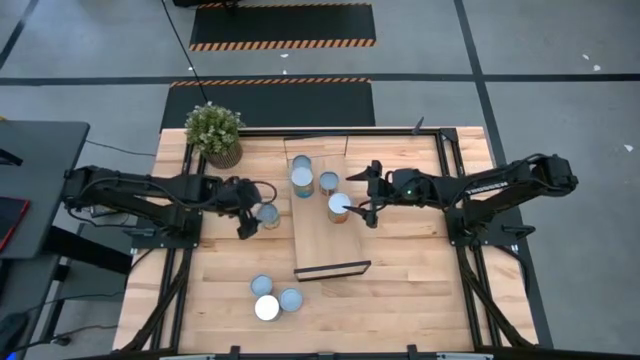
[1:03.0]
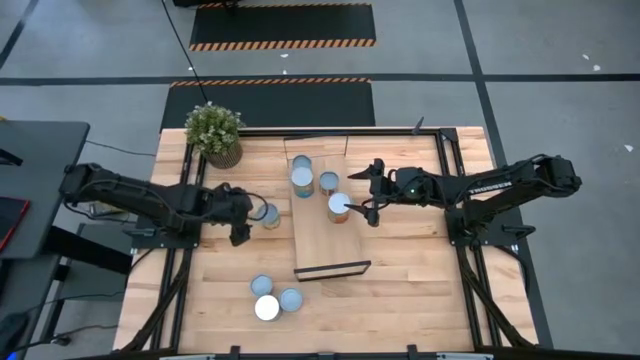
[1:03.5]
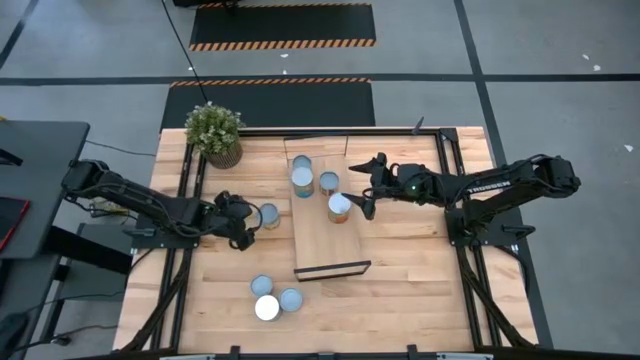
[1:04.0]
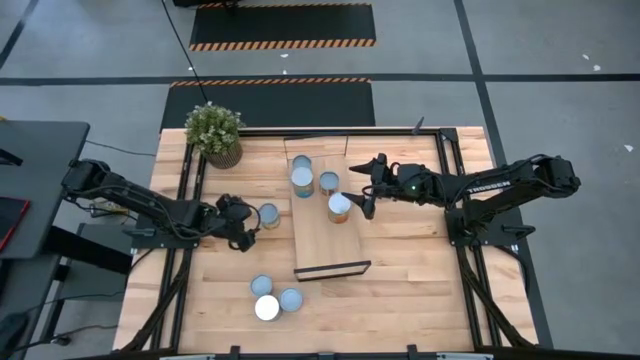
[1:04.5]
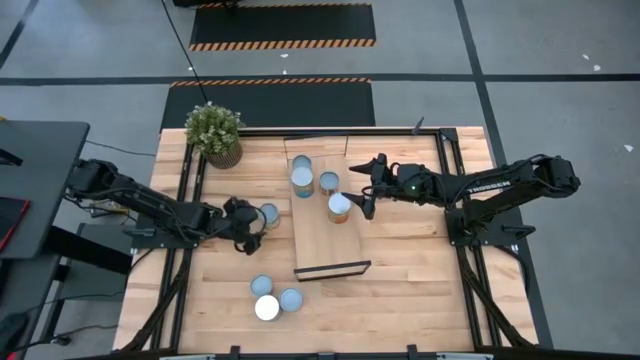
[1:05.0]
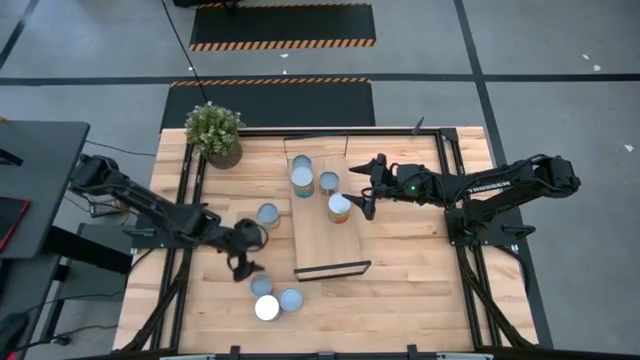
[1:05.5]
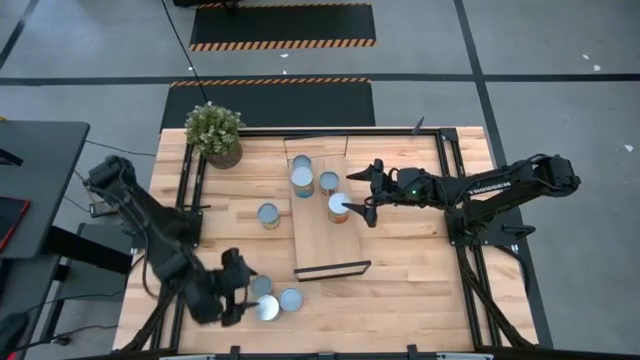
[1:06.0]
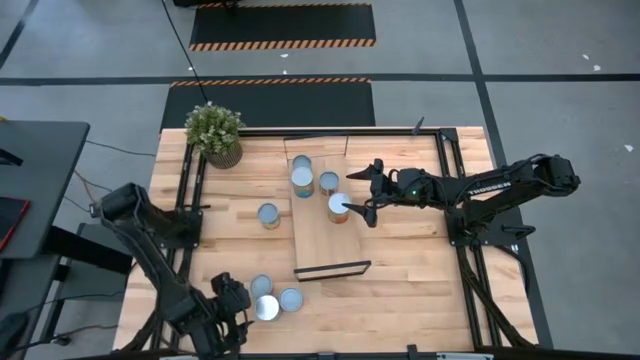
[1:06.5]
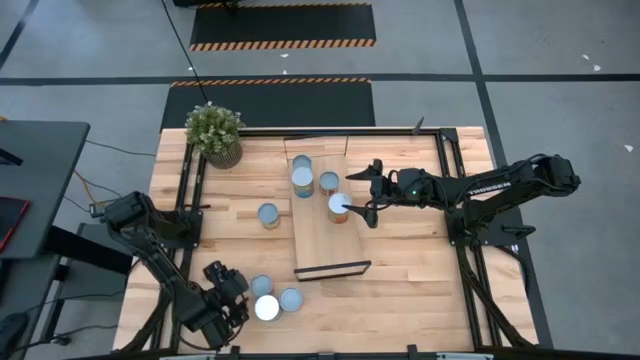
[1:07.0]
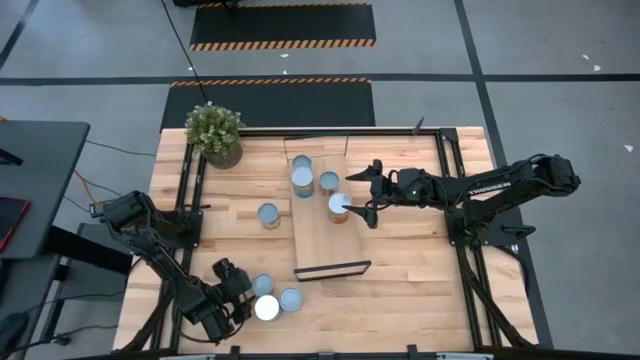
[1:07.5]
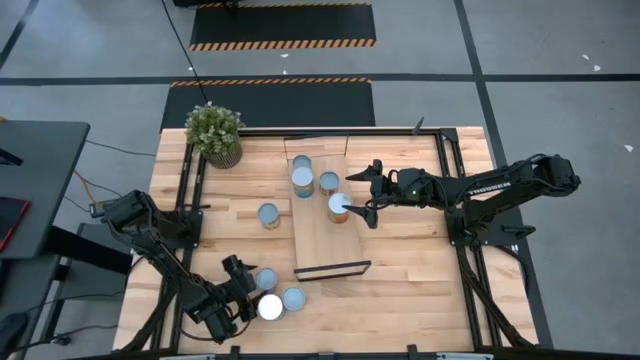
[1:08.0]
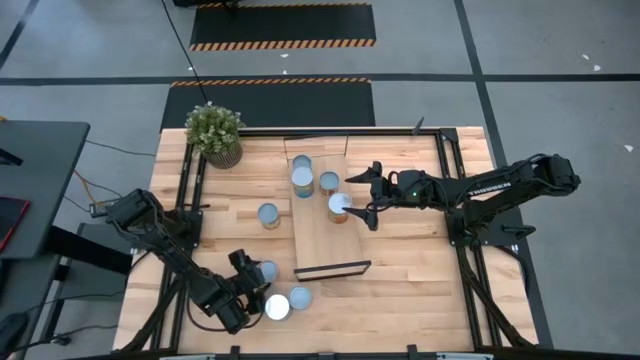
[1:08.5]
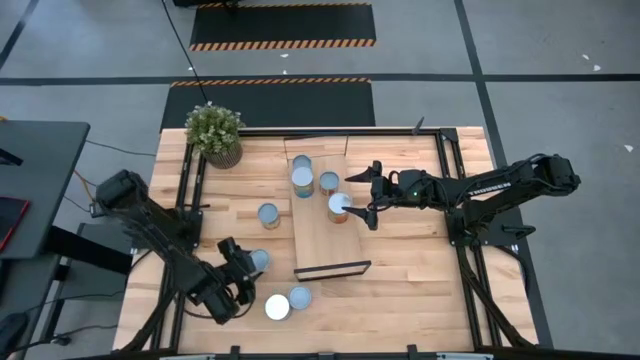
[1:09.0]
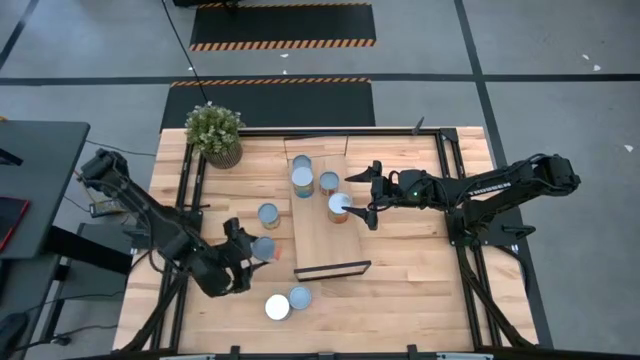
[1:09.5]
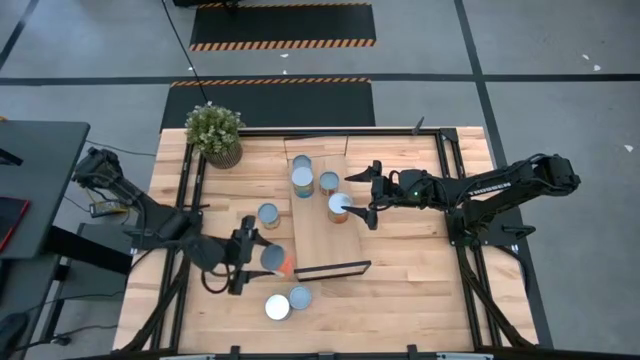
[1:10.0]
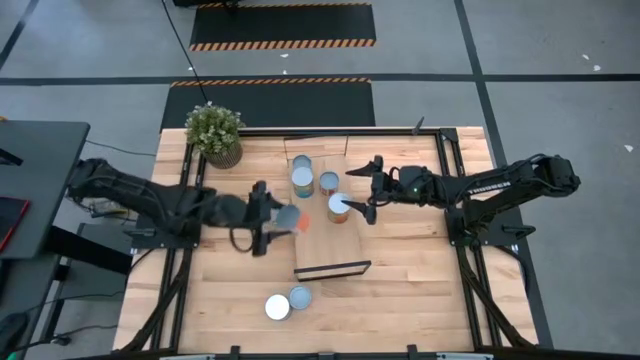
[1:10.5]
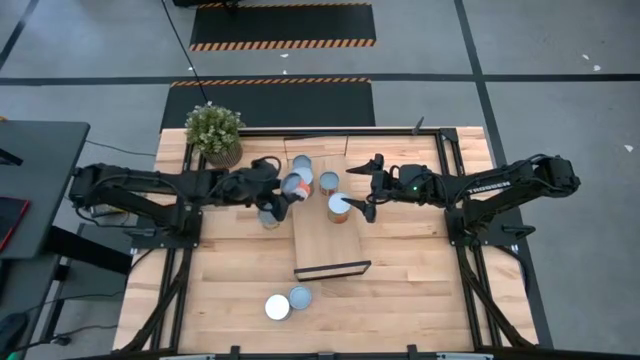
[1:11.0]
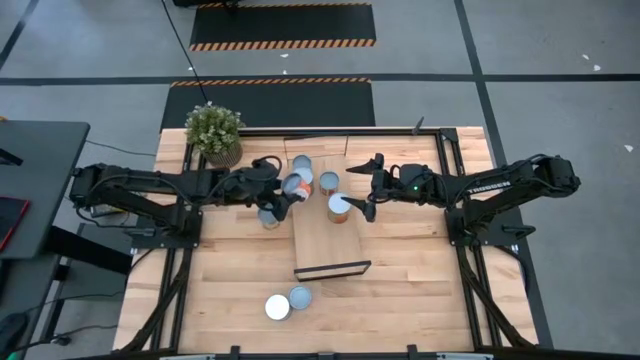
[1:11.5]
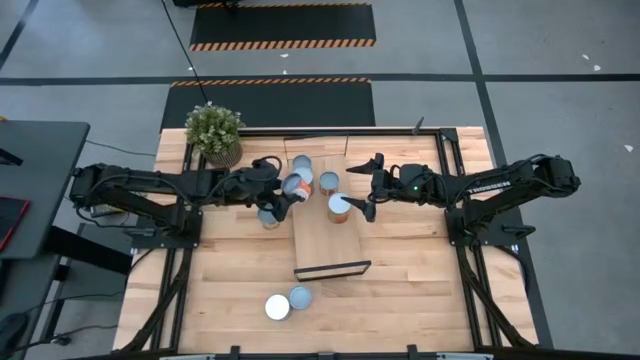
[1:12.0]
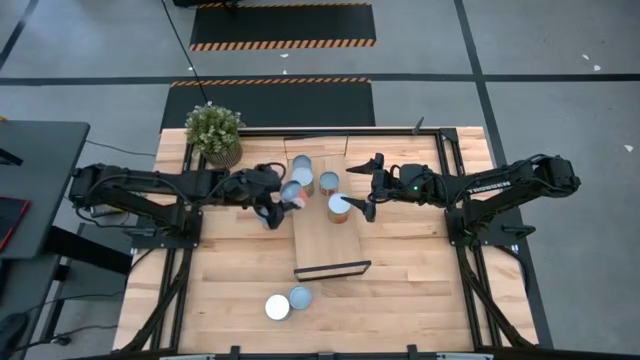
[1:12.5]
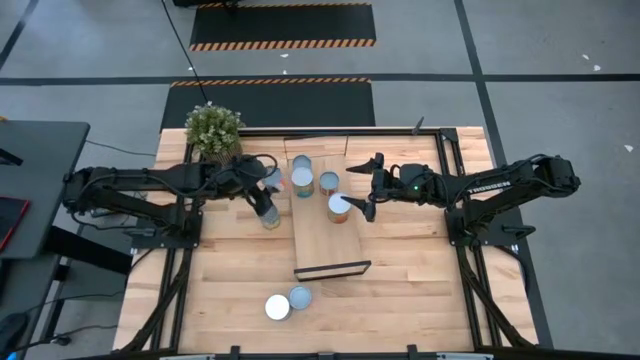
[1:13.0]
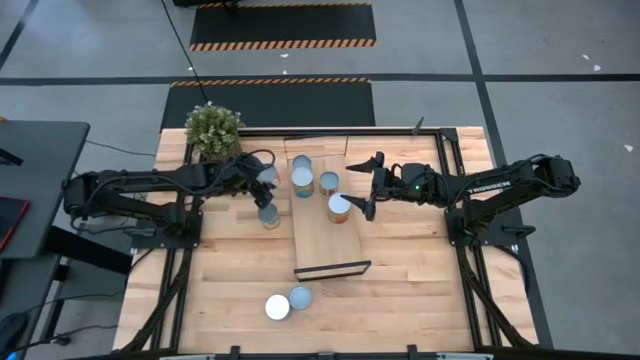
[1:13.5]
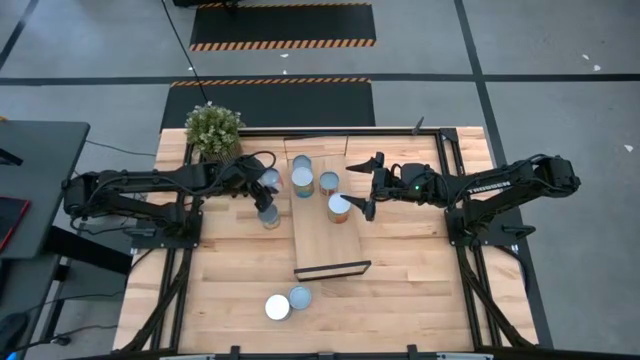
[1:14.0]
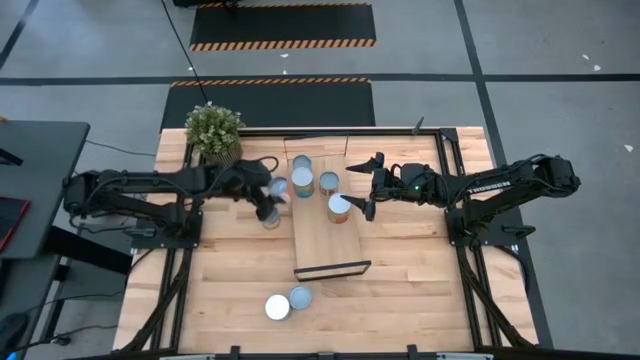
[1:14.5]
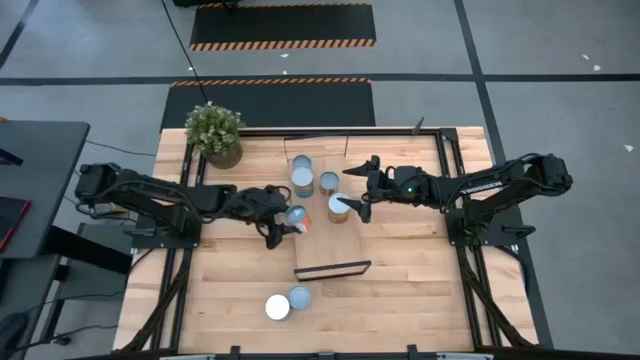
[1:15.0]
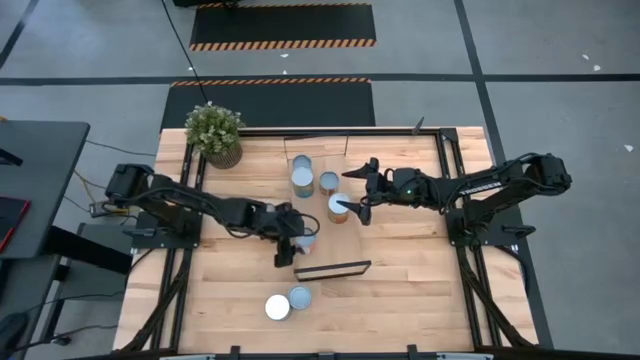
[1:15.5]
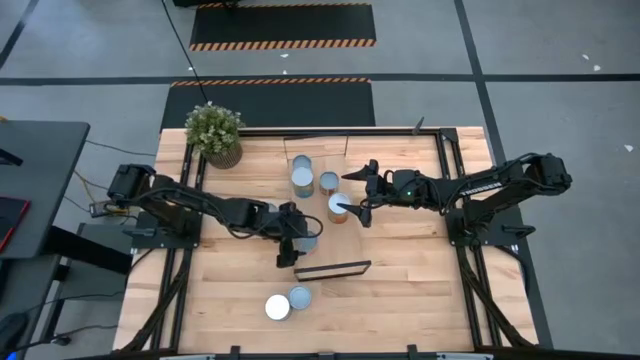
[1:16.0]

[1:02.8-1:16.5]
Task: Pick and place cans onto a shelf
Put the canned meatball sauce on the shelf

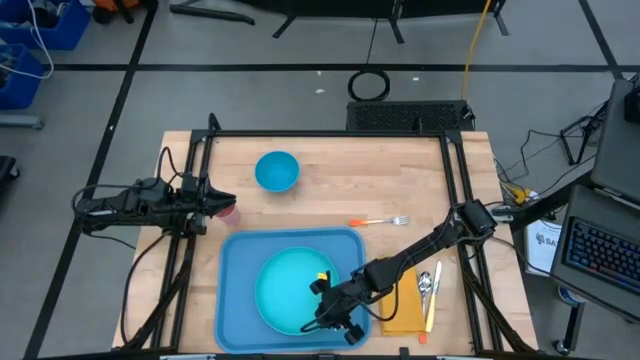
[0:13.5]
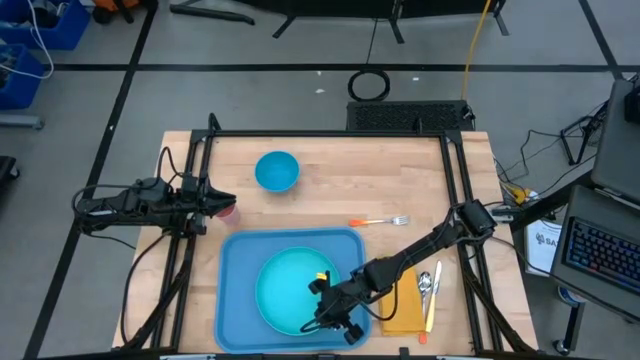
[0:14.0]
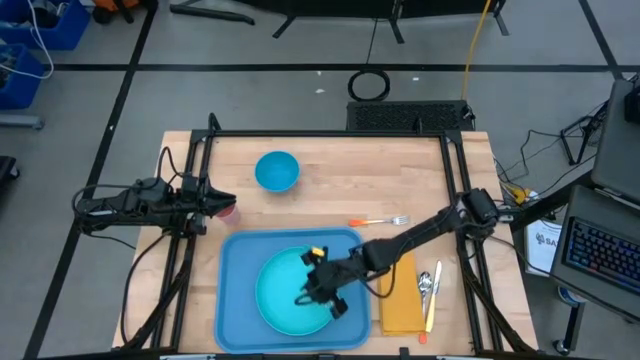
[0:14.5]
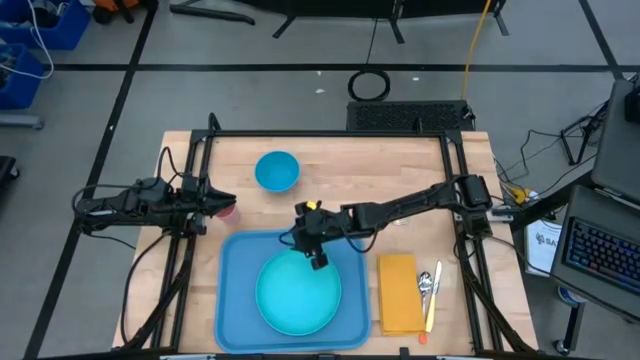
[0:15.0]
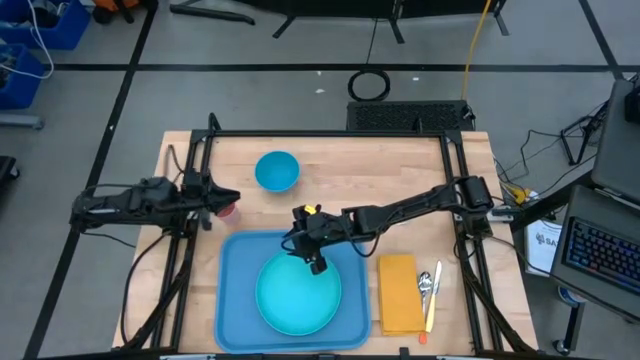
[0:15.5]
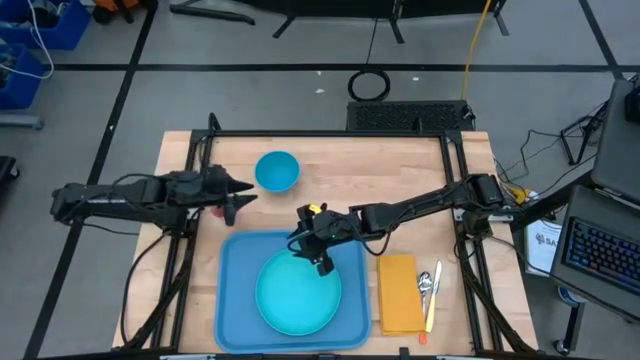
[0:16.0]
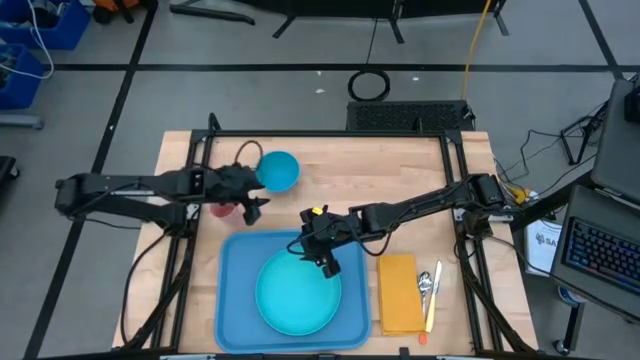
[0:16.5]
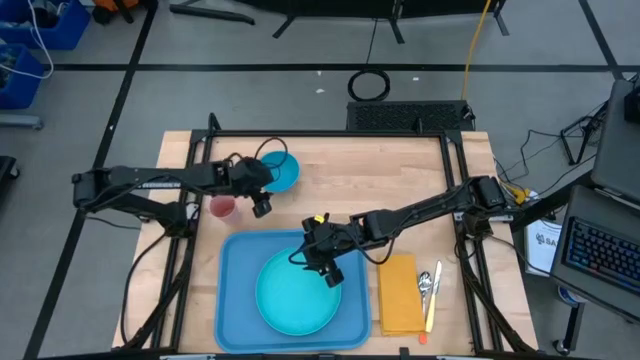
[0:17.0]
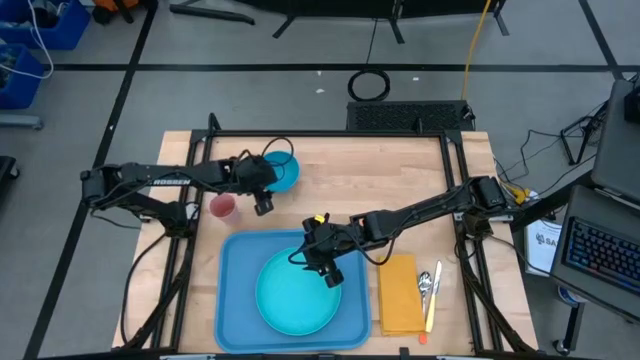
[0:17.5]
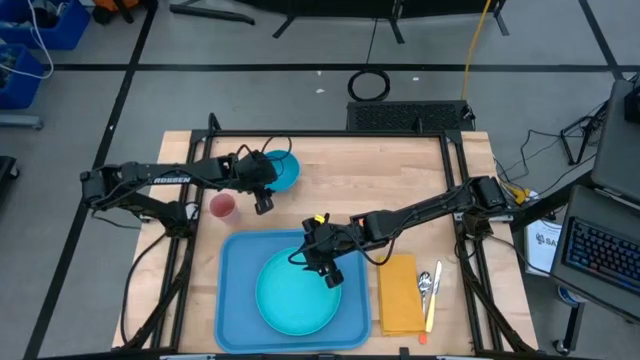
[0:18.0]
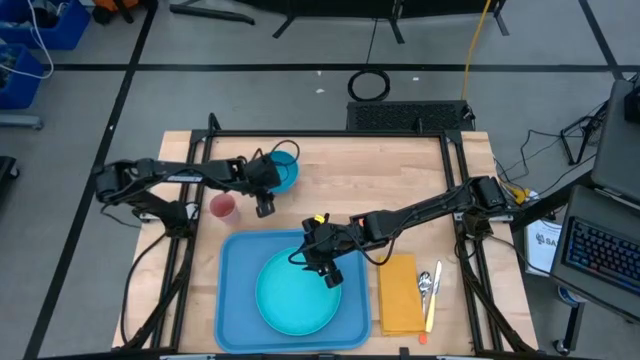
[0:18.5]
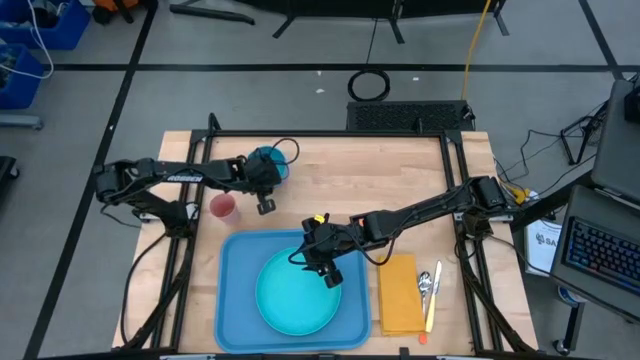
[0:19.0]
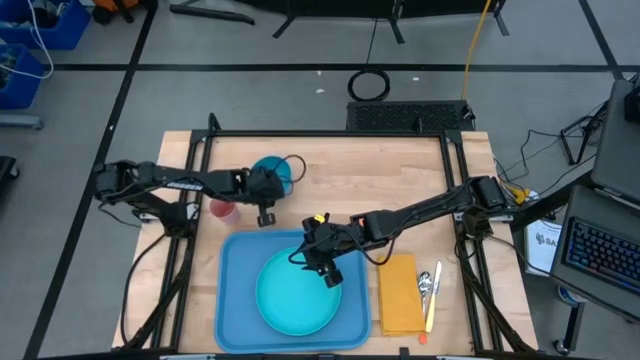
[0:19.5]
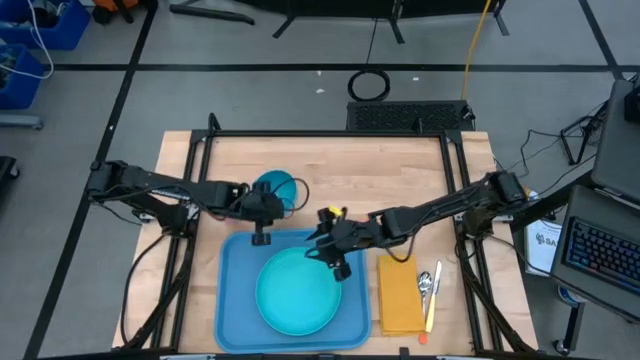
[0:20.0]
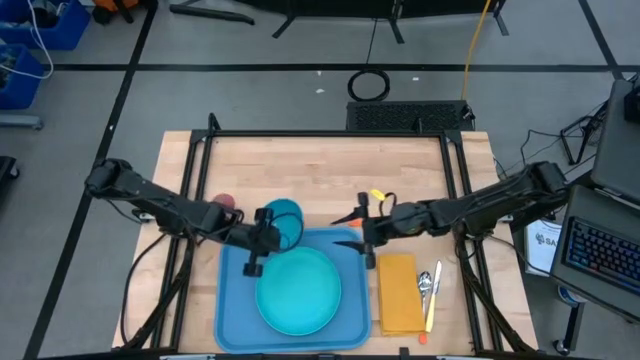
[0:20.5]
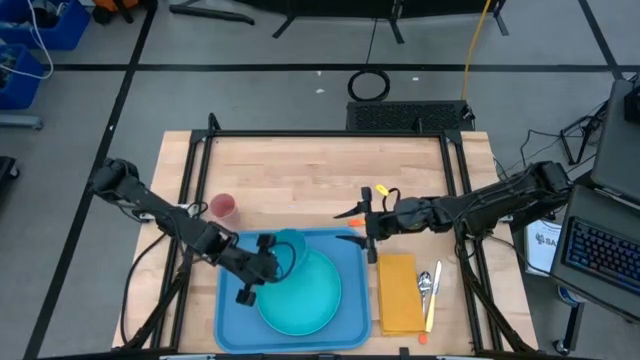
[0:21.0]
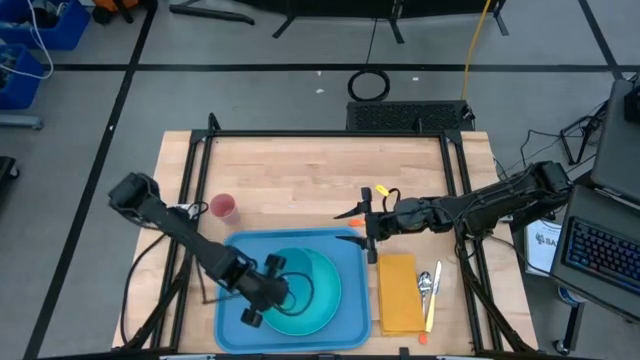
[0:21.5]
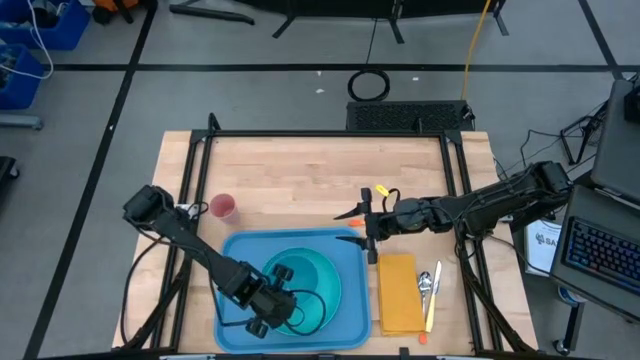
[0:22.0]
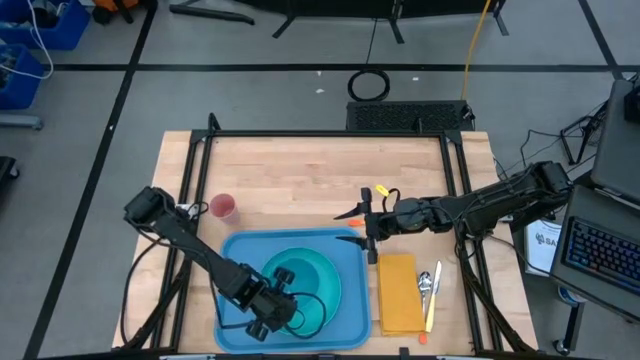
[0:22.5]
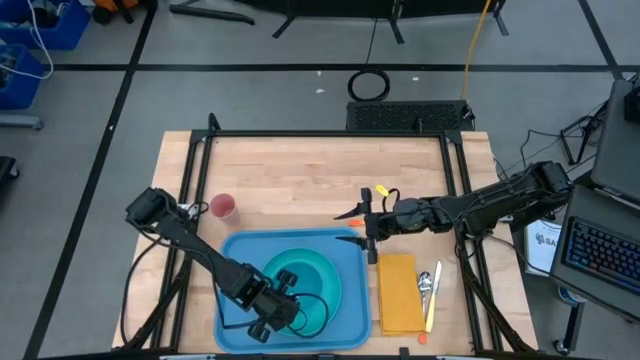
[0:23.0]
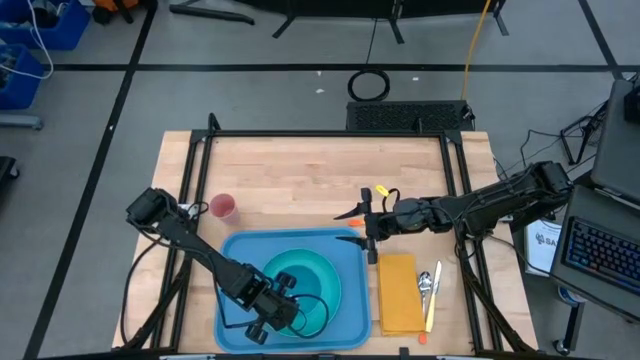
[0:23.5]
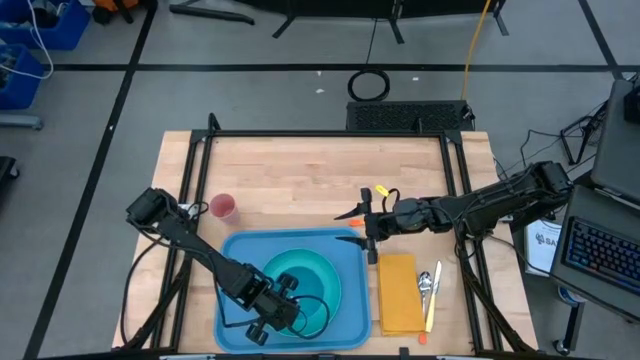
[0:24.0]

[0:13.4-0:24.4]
Task: Set up tray
Put the blue bowl on top of the light blue plate
